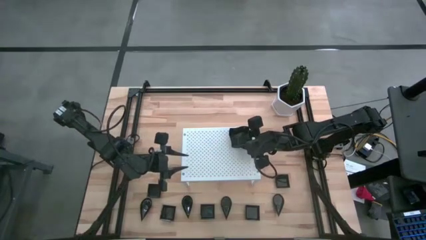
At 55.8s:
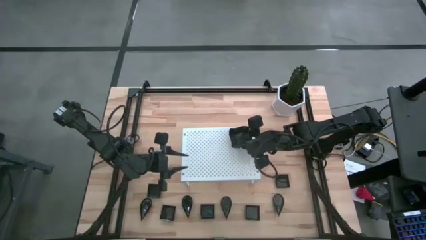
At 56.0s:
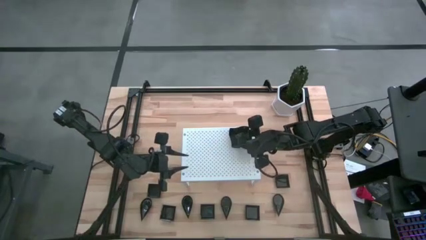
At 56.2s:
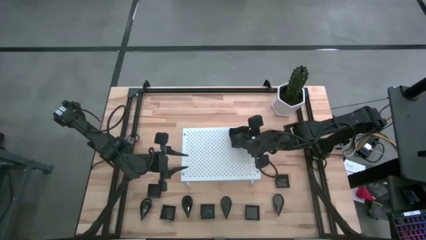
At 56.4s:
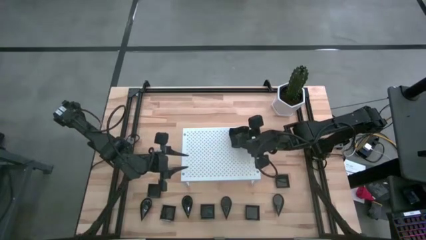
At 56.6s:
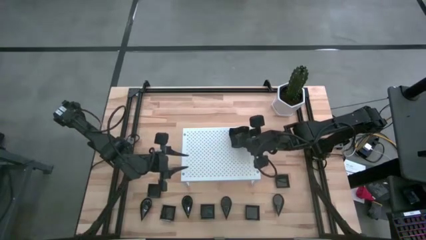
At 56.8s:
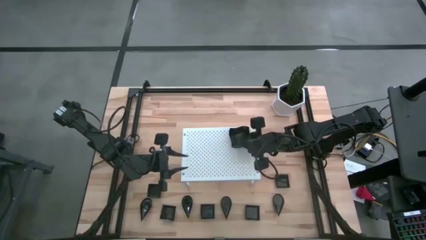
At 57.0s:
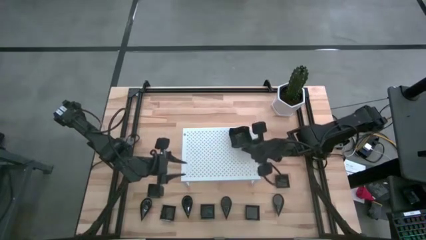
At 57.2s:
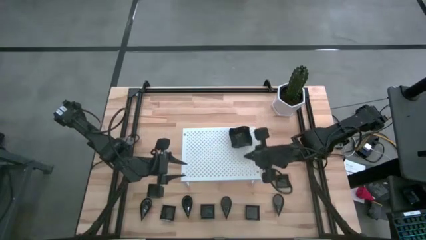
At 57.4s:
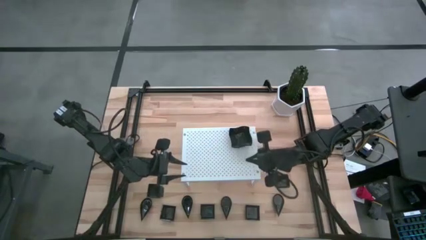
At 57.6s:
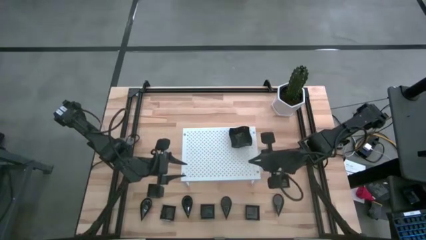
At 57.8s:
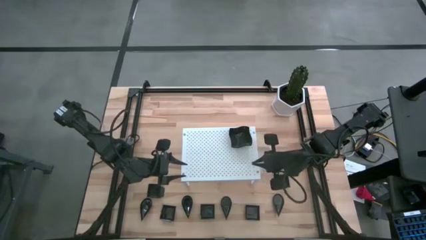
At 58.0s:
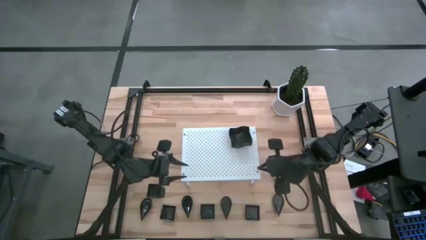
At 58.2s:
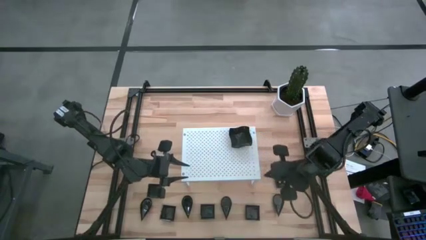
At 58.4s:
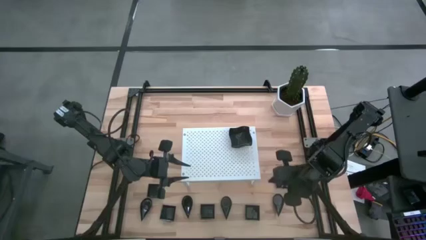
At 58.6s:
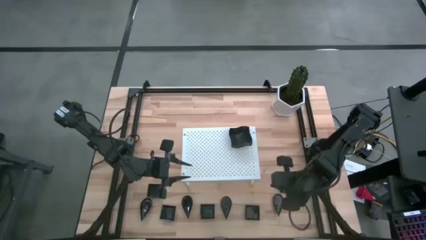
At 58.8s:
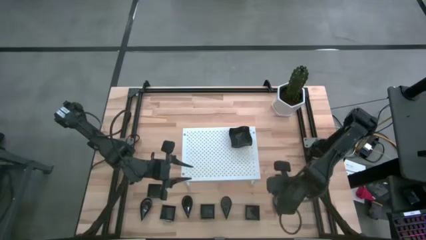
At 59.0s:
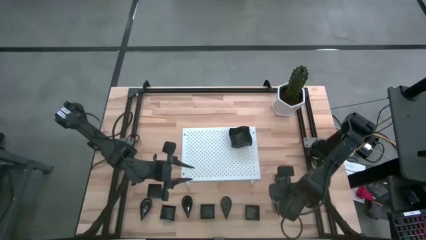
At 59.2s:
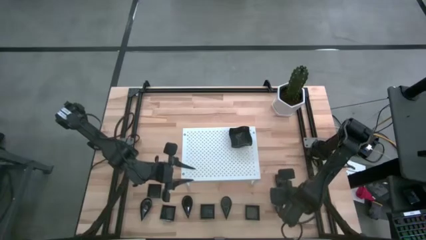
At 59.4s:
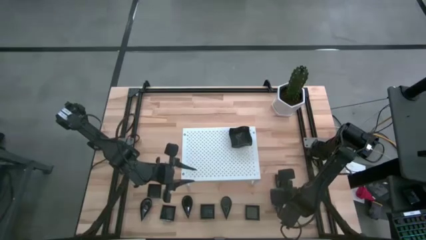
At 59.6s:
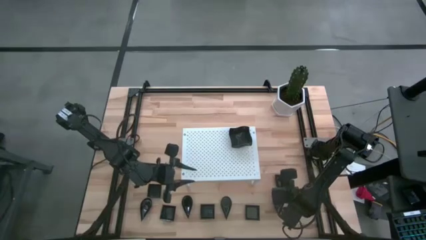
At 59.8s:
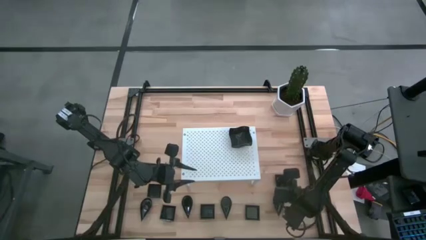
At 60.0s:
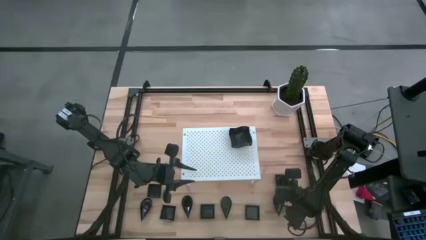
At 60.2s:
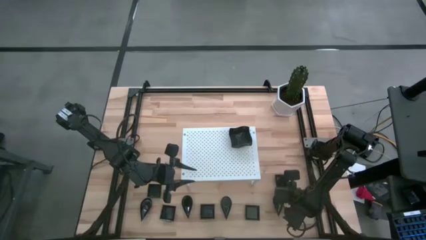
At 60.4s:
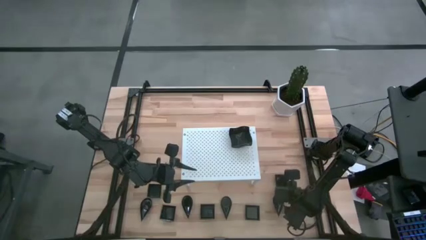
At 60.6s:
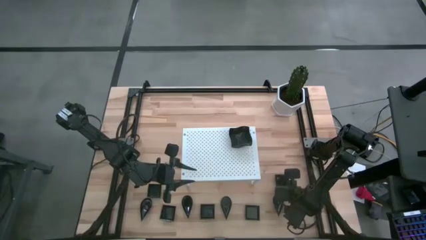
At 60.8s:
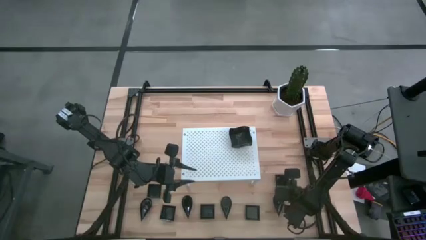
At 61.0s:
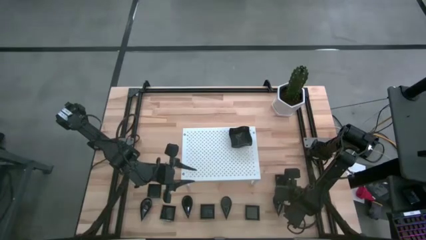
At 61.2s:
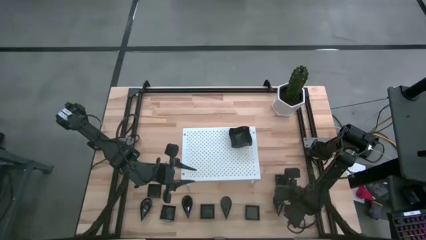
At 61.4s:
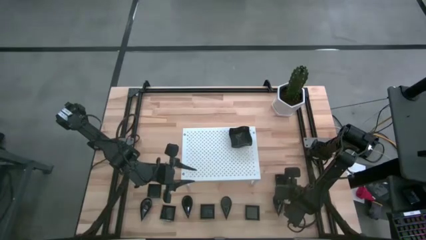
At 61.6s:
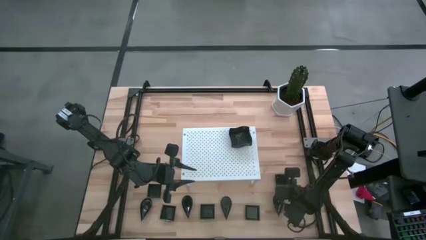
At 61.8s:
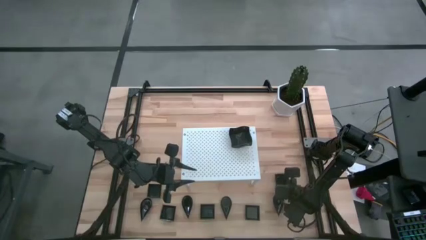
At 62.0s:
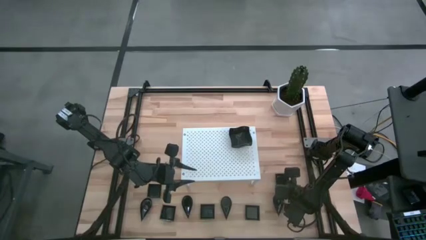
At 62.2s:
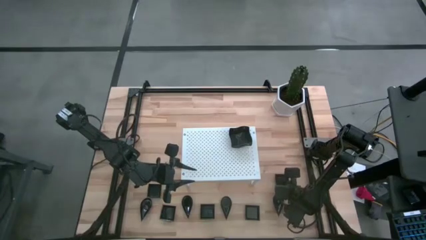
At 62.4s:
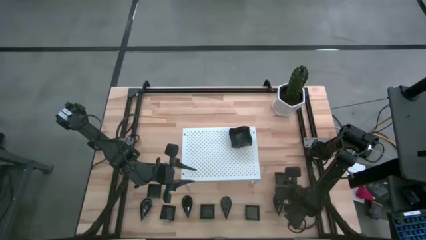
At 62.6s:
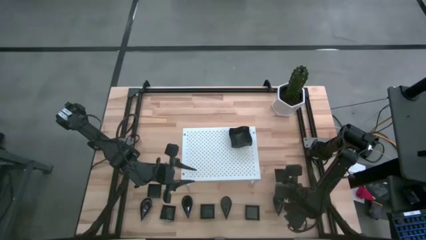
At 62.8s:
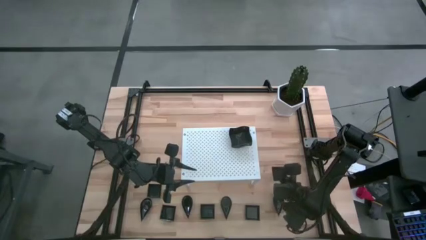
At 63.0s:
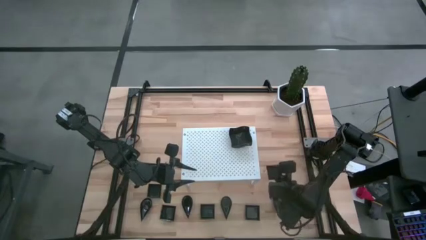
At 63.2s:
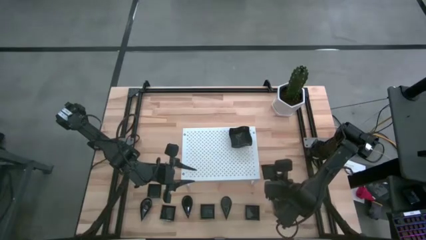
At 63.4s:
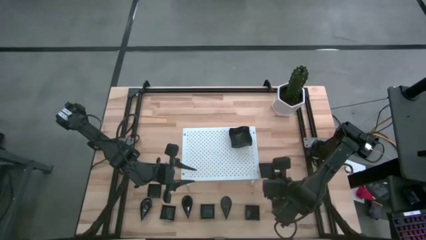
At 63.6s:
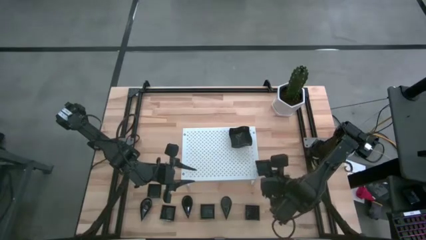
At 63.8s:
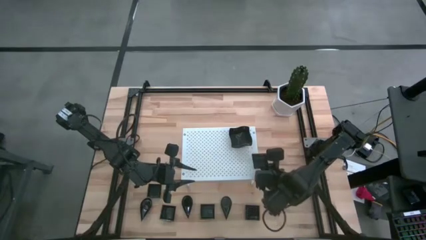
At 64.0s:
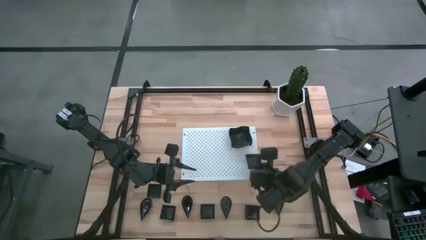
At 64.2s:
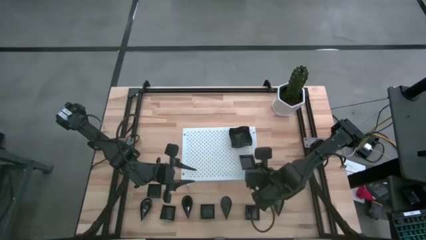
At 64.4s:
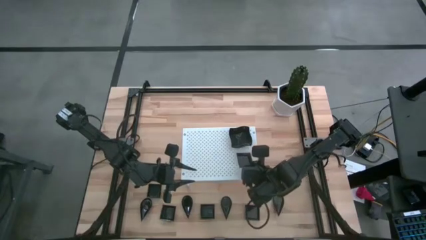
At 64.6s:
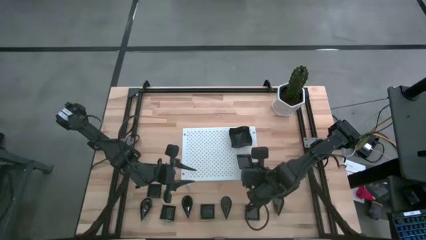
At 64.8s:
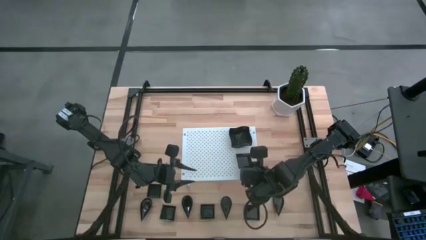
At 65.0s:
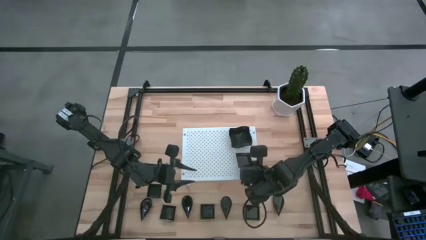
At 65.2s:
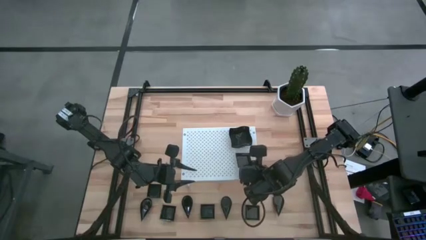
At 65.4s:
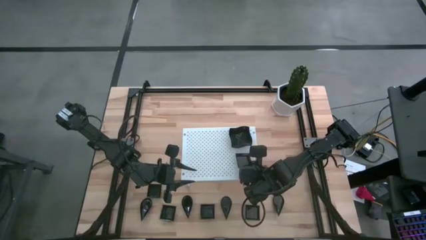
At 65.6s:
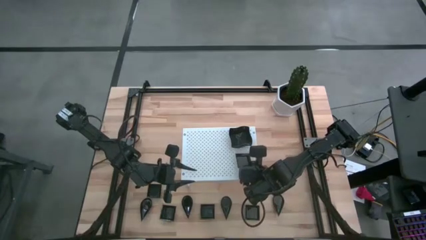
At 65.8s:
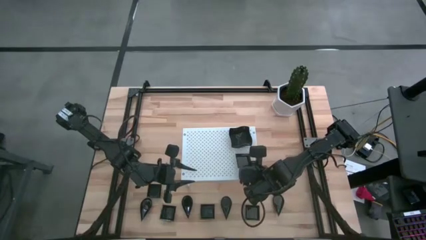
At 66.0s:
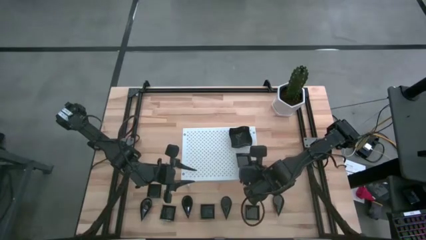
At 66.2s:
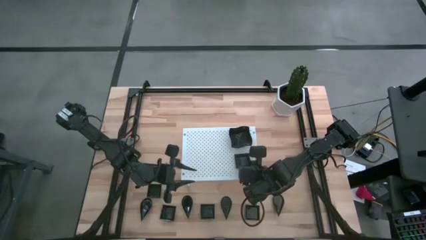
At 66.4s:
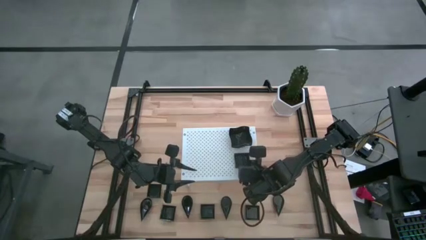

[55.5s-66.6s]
Task: Pick & Place Mini shaped plates
Put the square plate on the shelf

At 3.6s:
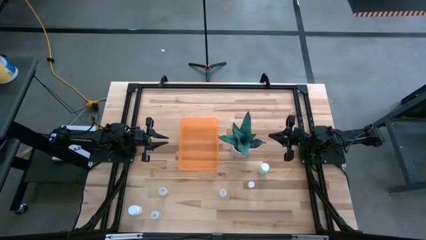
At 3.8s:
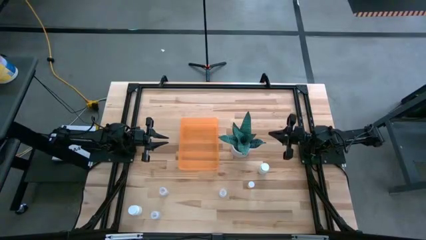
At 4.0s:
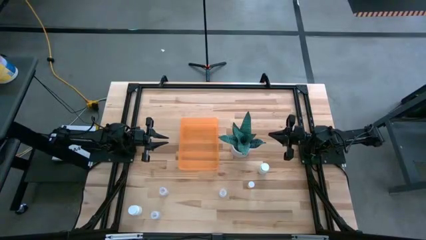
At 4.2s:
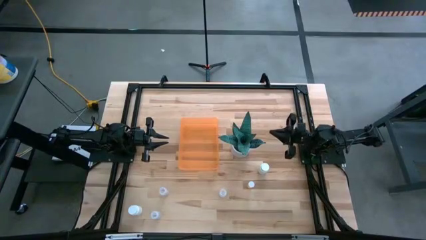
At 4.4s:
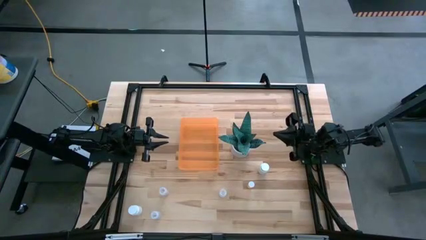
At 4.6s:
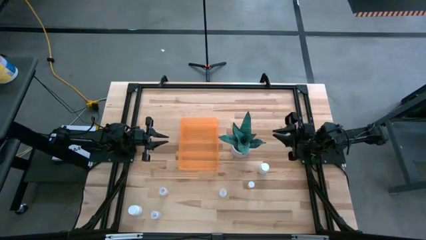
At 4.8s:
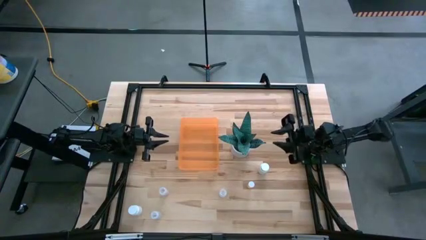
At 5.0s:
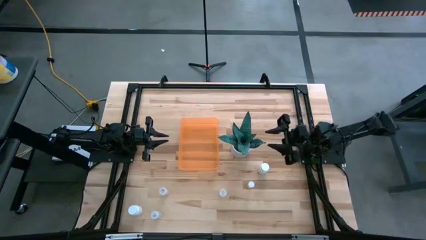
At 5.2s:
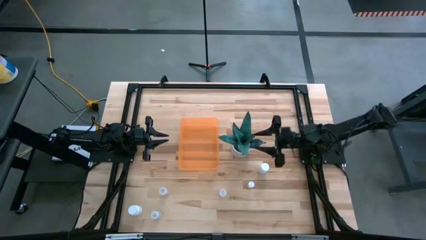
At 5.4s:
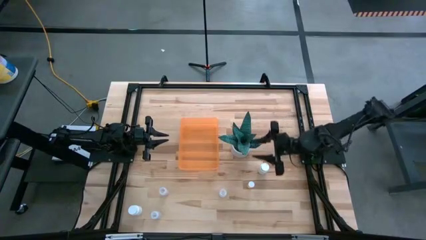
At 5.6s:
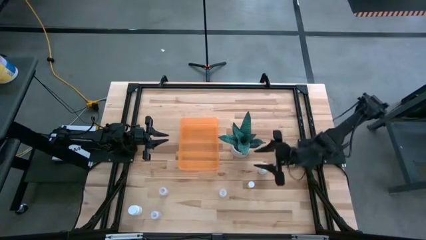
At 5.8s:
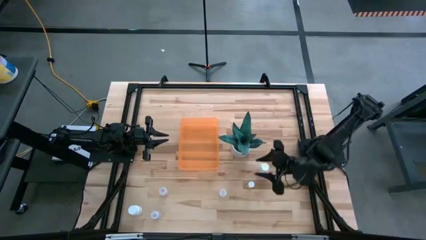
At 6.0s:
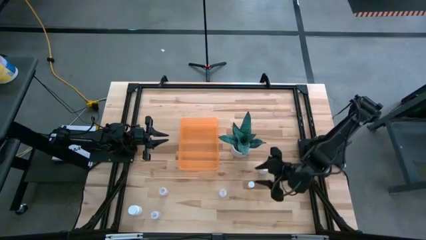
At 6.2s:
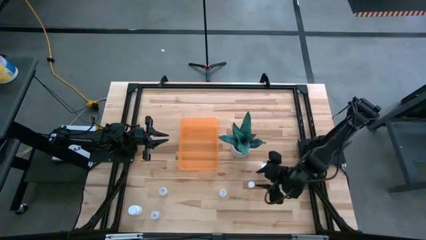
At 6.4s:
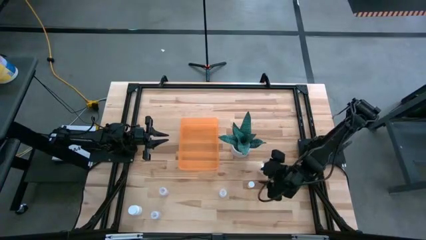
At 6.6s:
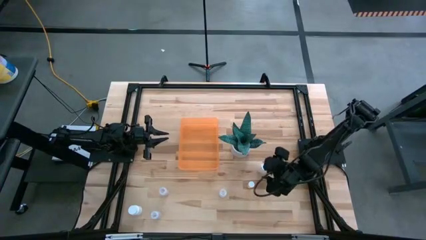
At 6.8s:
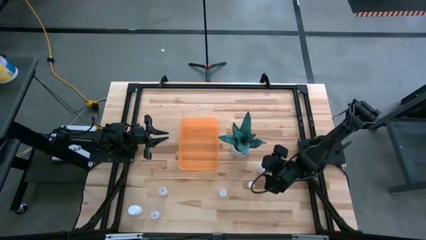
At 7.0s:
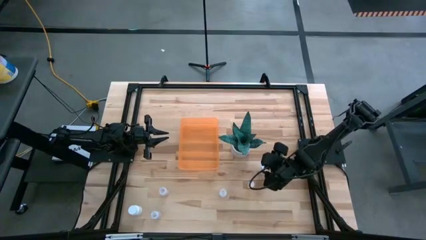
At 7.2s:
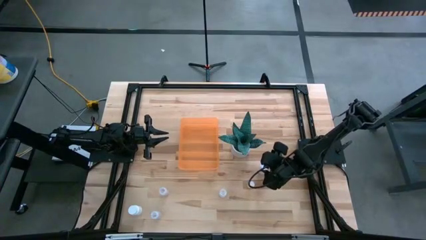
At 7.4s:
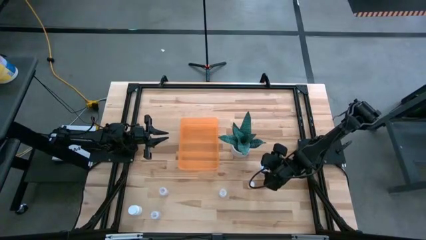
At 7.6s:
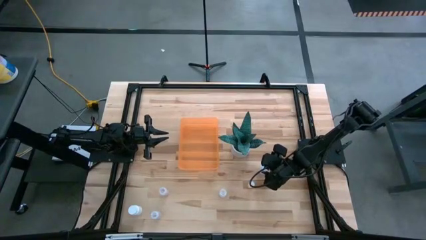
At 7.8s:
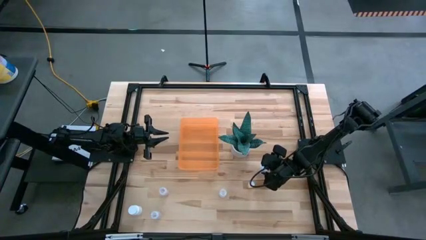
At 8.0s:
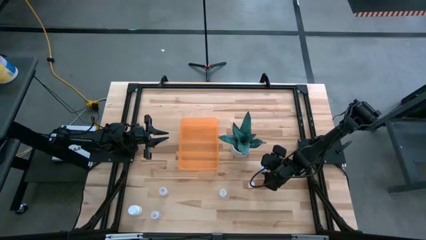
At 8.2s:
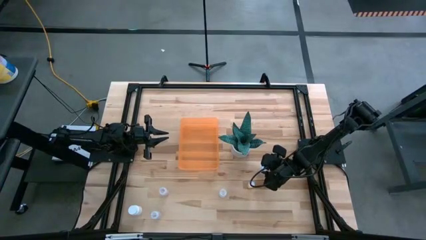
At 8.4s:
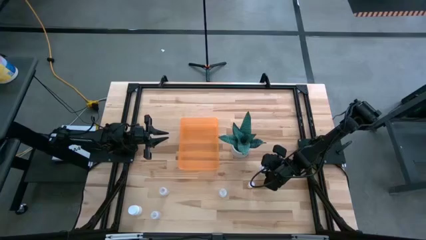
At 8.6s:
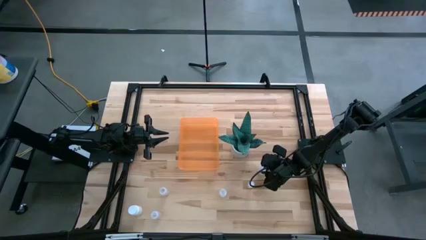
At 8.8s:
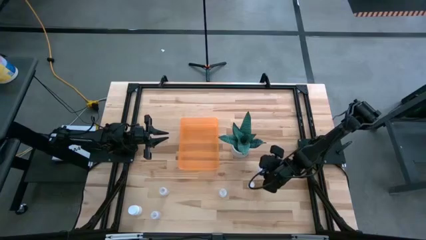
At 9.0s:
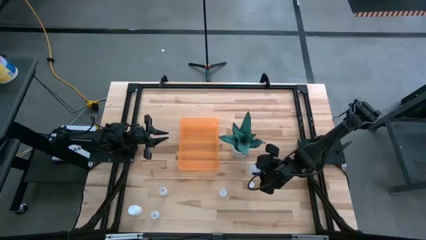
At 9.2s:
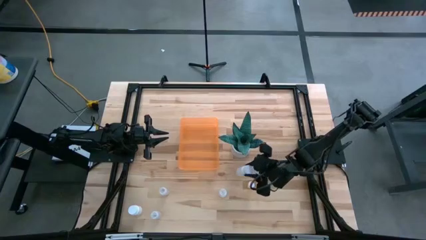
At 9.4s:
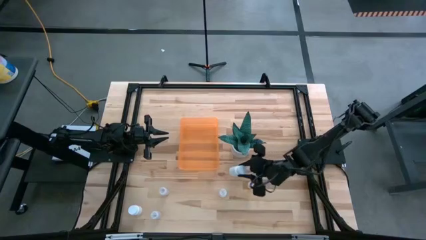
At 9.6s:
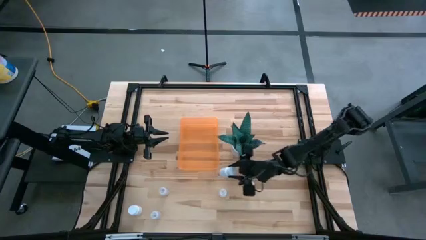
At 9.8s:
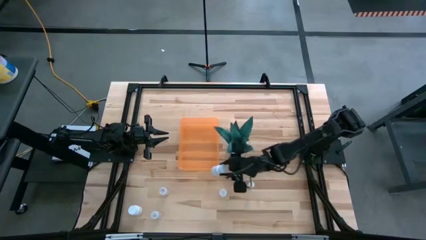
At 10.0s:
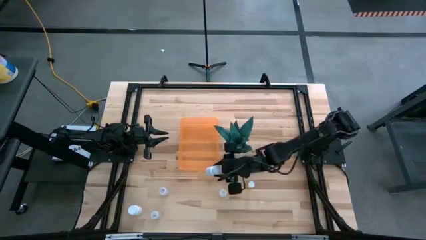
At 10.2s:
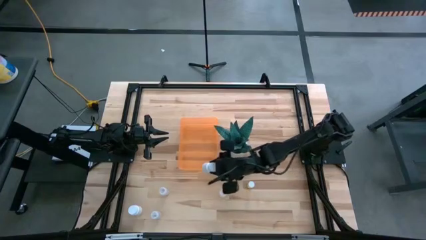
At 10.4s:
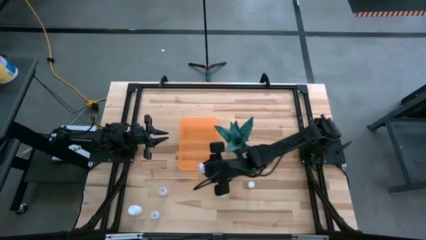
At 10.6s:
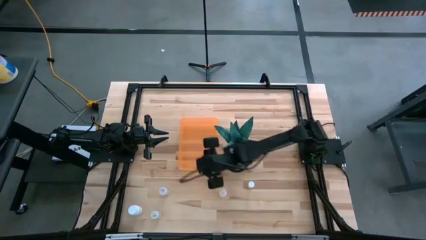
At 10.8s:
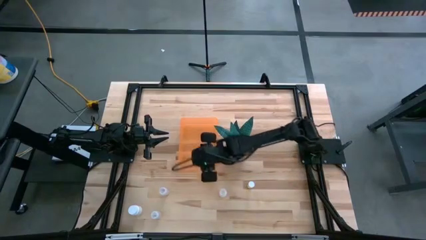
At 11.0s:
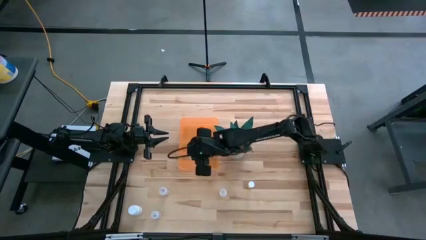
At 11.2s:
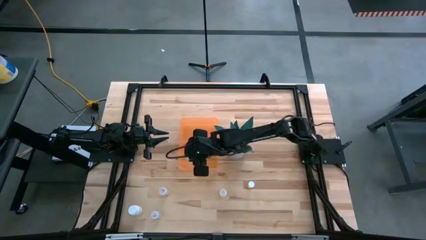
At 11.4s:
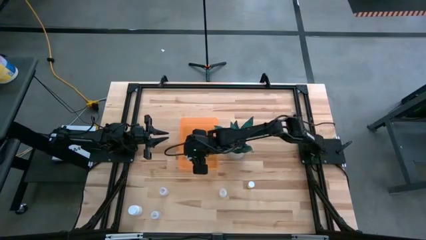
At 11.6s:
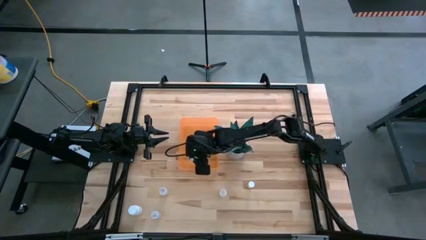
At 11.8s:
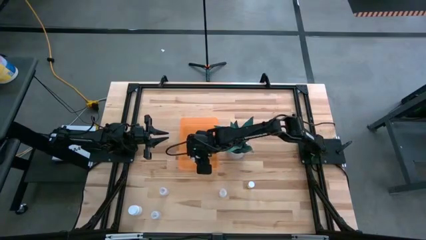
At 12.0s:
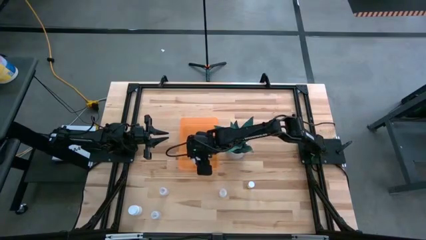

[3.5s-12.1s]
Task: Pick and place pill bottles into a basket
Put the right white pill bottle into the orange container
